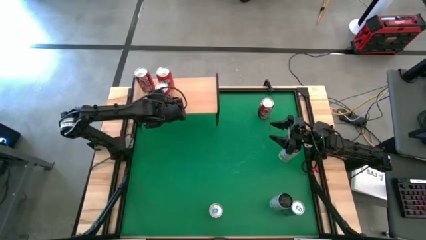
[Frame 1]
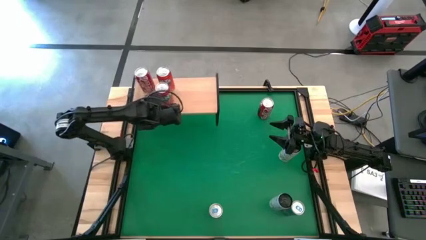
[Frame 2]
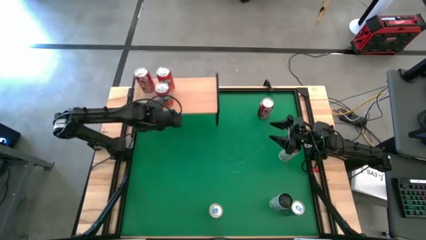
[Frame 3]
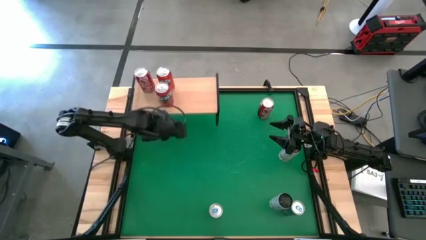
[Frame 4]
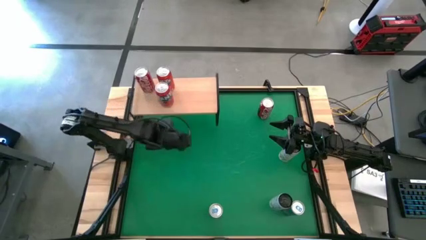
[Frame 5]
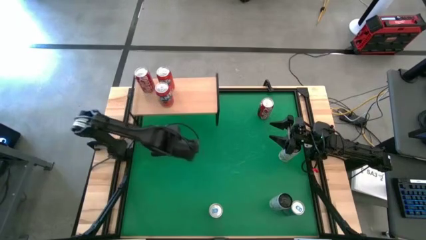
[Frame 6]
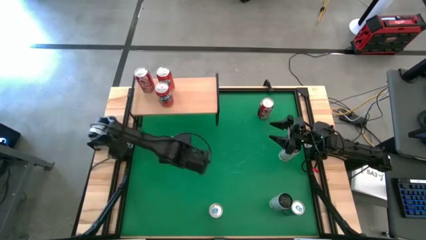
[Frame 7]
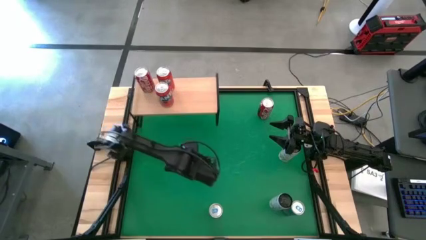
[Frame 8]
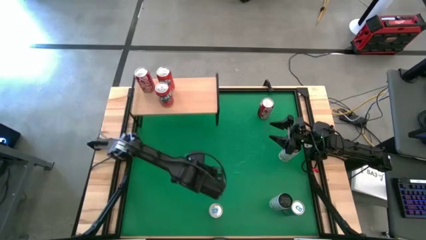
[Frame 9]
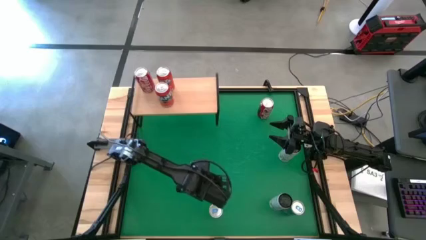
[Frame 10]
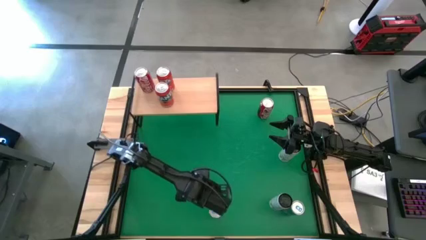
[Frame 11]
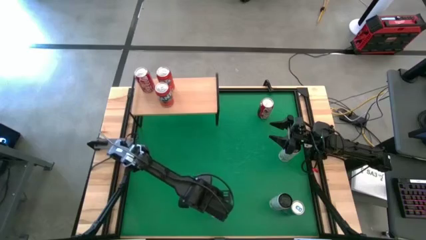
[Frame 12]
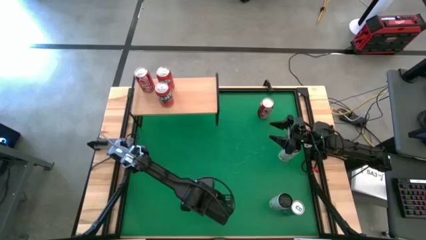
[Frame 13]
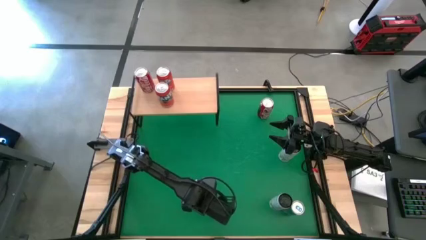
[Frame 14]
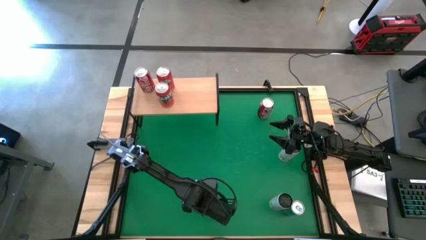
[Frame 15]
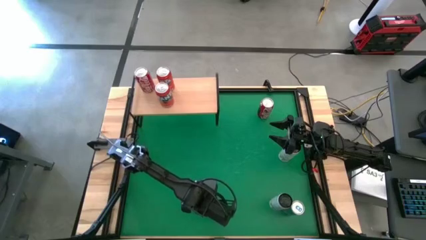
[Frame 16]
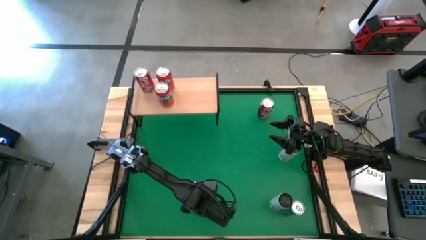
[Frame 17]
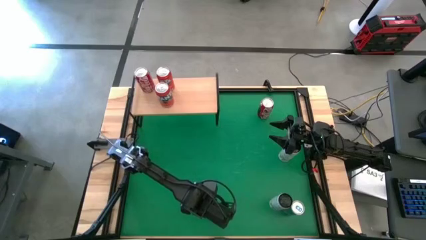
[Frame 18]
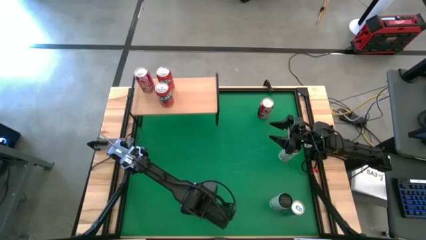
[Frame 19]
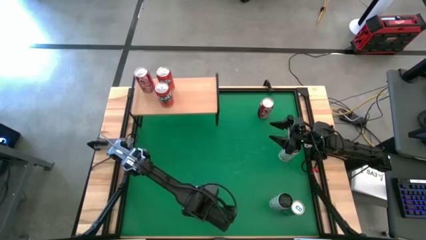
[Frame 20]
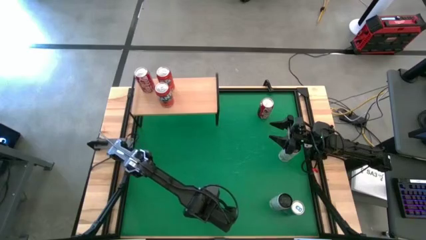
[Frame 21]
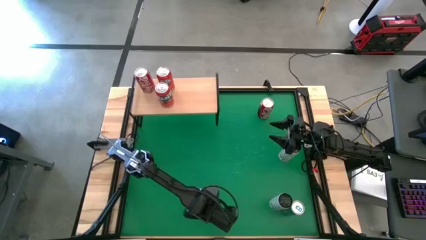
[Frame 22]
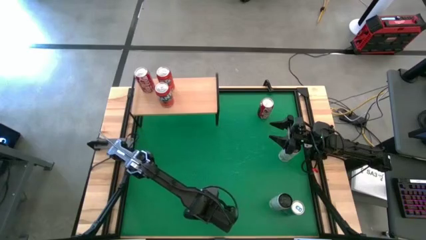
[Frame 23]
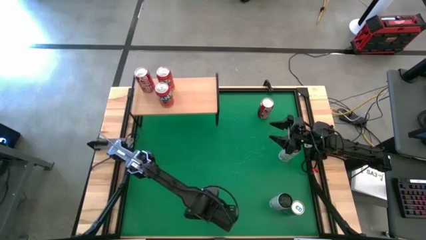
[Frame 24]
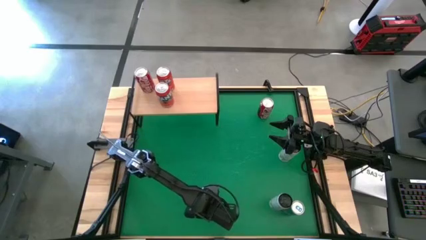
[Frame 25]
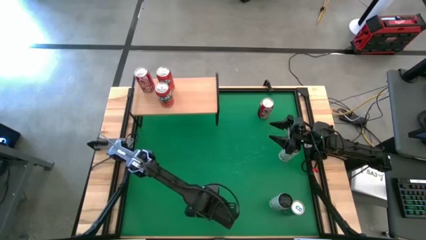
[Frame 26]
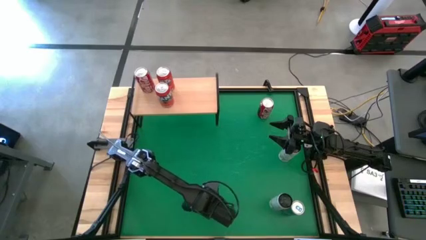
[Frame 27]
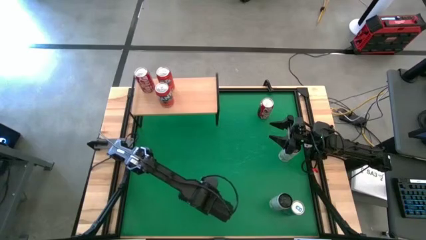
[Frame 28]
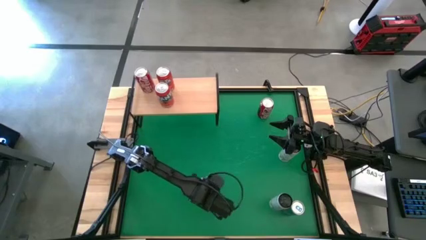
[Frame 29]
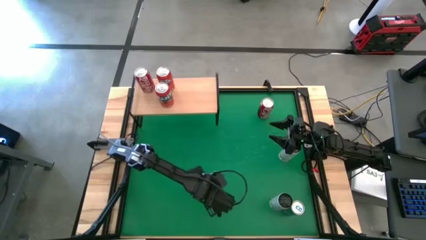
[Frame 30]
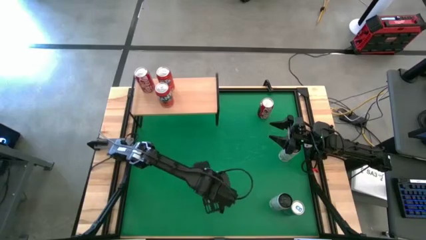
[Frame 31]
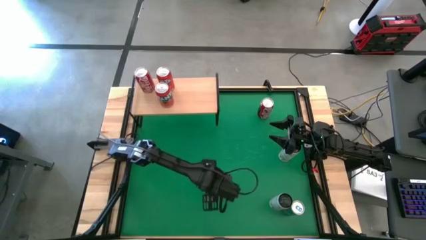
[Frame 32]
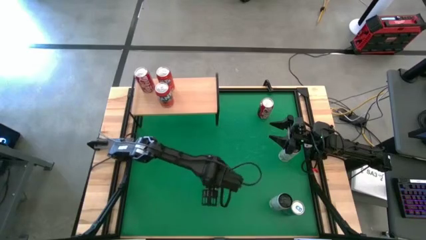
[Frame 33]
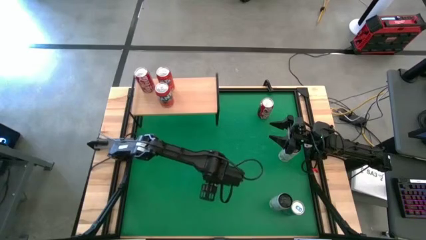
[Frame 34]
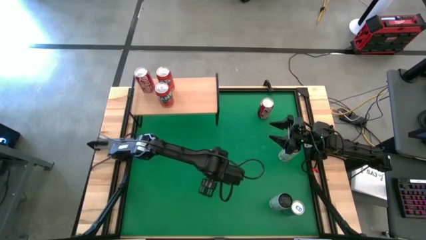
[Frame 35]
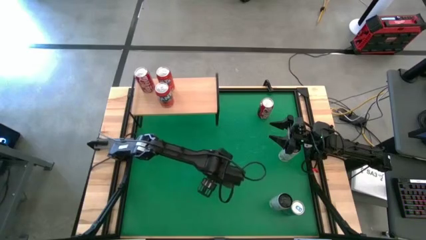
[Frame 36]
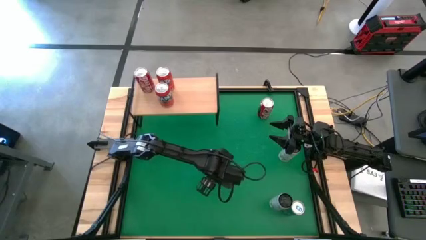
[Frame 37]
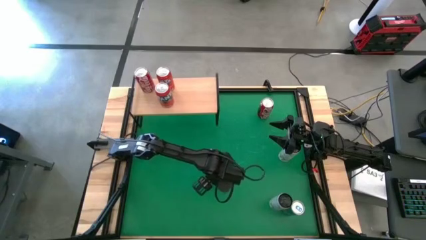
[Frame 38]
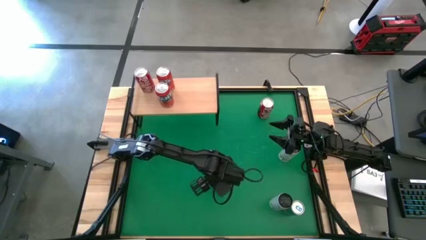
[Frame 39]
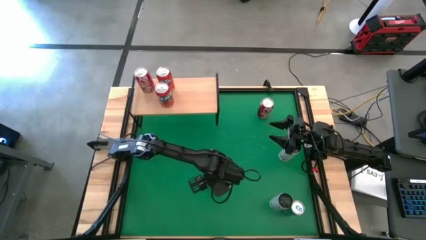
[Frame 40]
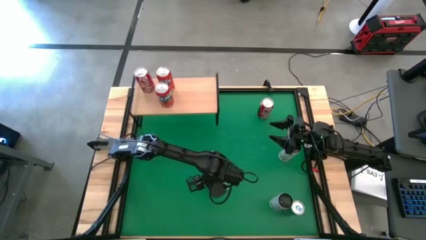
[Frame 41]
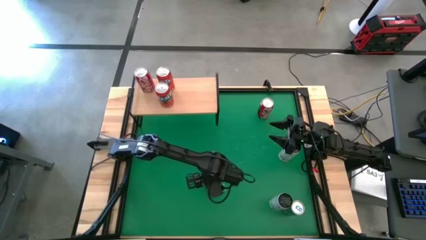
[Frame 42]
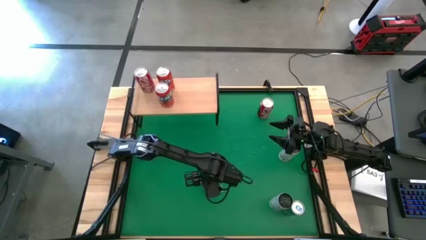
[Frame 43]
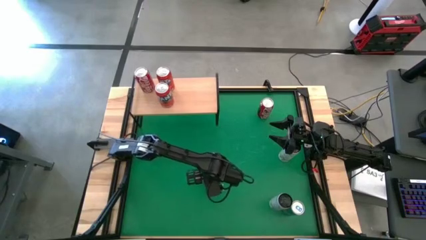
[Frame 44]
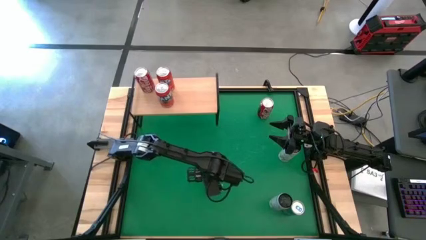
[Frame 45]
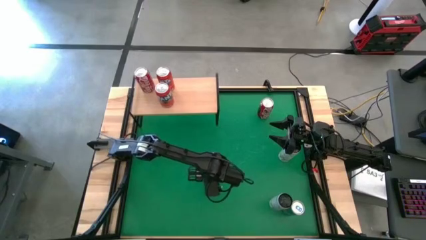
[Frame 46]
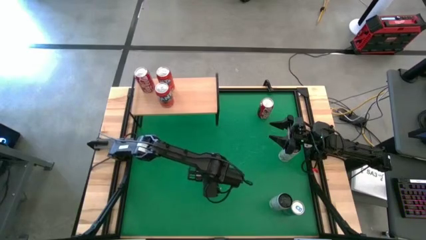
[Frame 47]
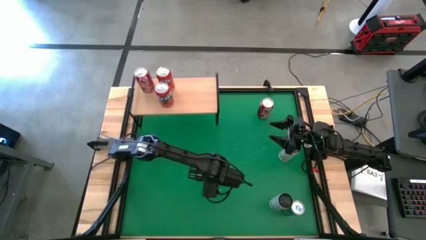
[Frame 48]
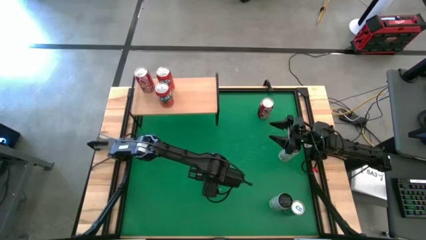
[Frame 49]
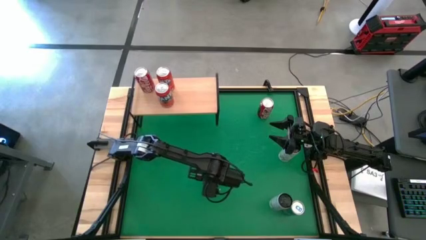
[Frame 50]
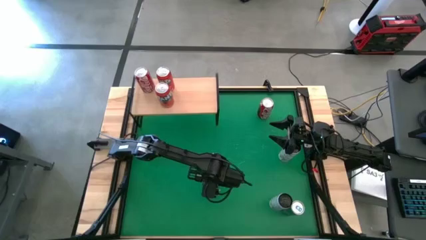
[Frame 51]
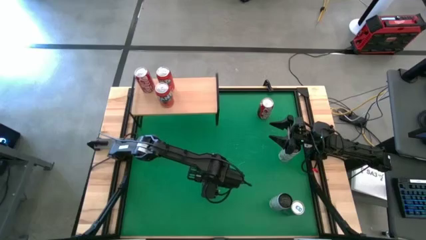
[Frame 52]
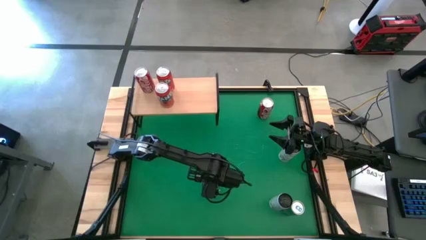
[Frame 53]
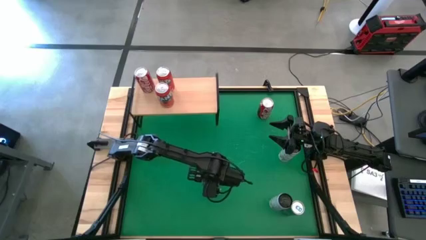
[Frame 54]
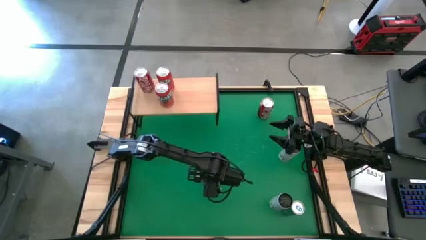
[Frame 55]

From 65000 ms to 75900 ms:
Task: Place canned beverage on shelf
Put the left blue soda can on the shelf

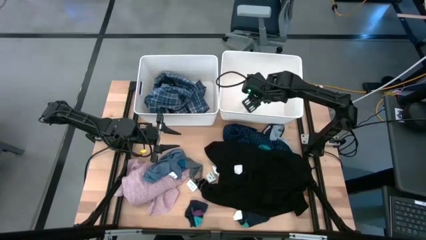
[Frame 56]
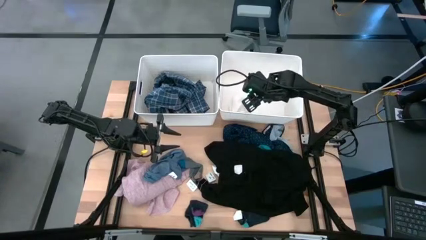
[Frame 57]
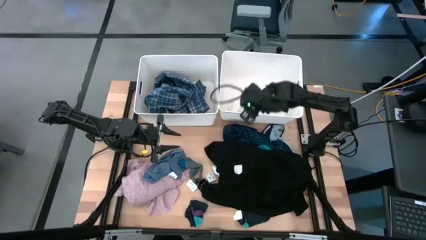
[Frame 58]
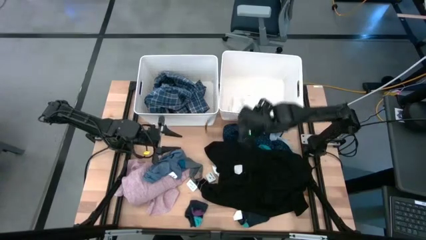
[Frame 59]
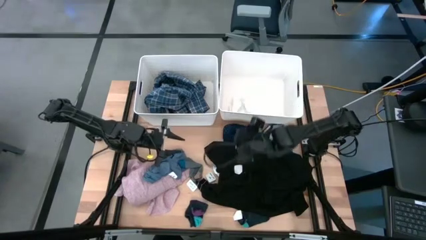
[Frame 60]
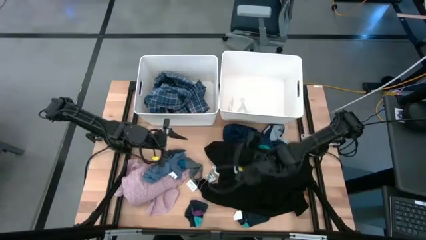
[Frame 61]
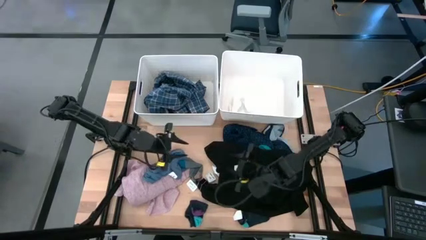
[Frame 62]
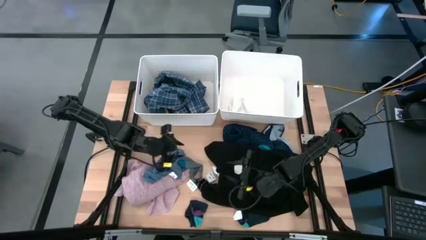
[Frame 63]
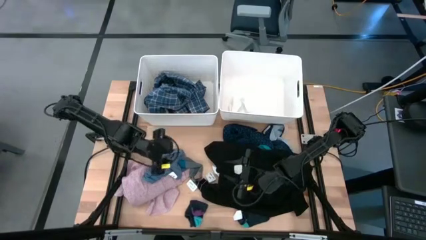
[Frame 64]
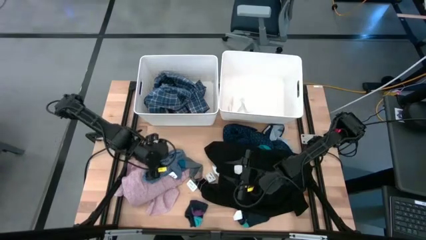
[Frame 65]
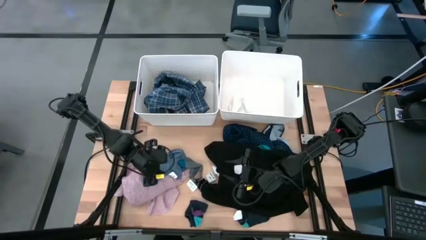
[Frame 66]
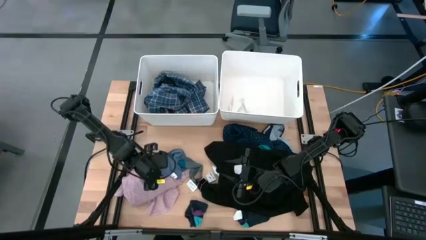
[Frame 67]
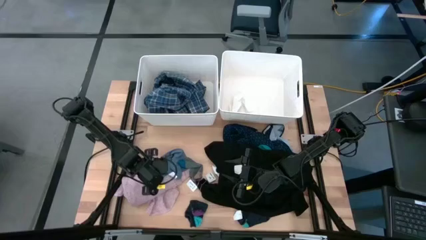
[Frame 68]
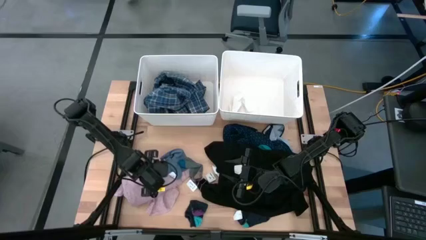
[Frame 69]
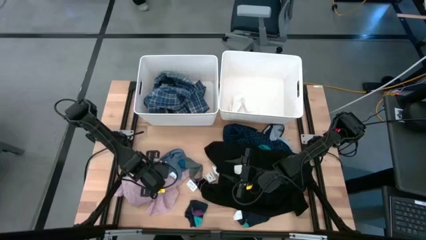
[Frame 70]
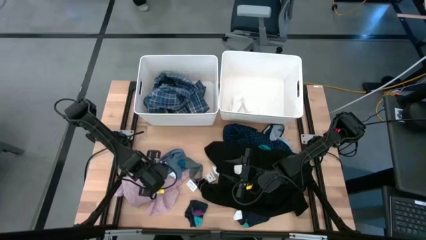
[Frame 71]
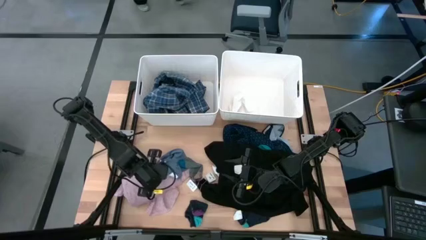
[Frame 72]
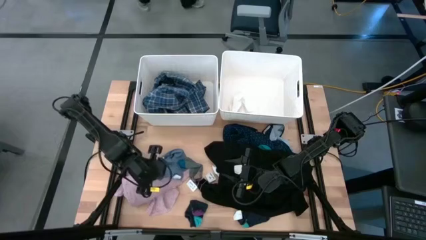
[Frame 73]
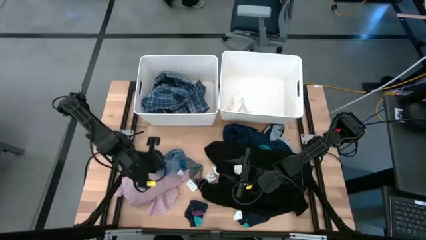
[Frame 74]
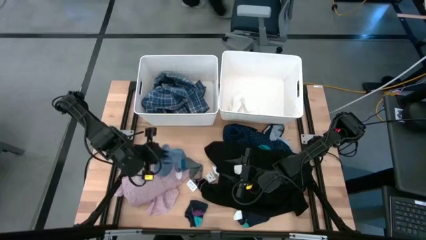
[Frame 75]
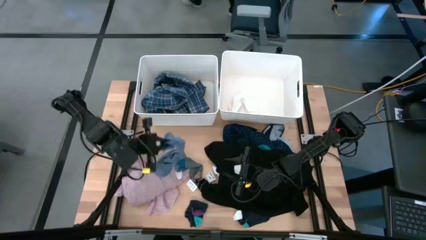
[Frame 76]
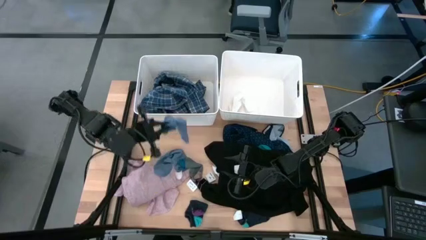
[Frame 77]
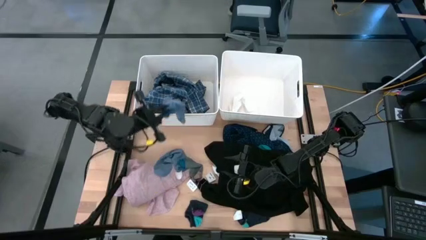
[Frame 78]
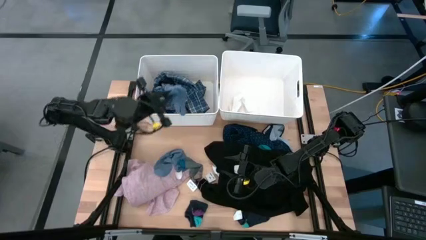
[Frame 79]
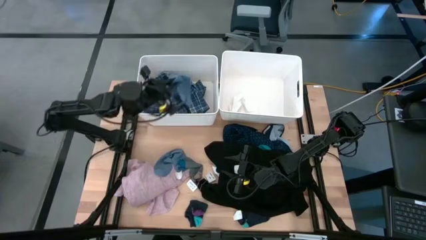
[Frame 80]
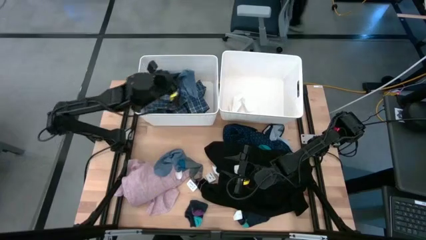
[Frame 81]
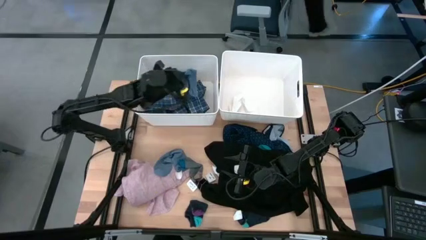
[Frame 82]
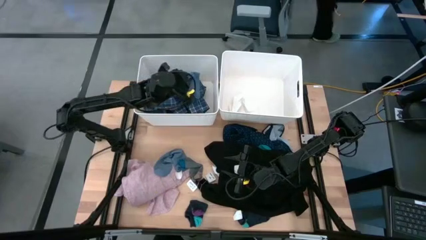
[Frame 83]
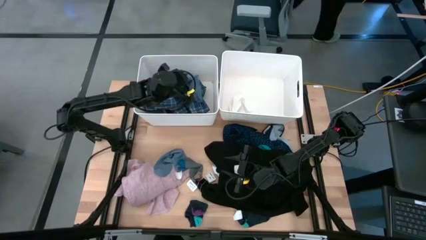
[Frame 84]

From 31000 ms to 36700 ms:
Task: Sort clothes
Put the bottom left blue sock into the left white bin
